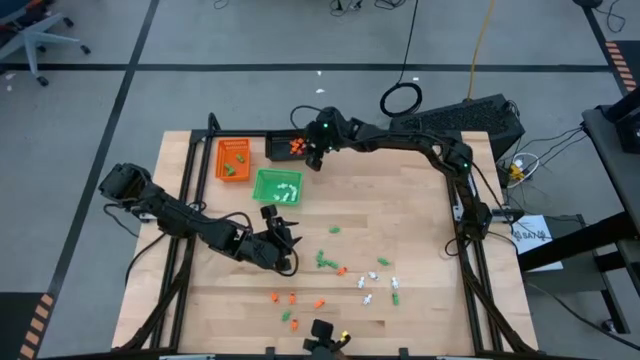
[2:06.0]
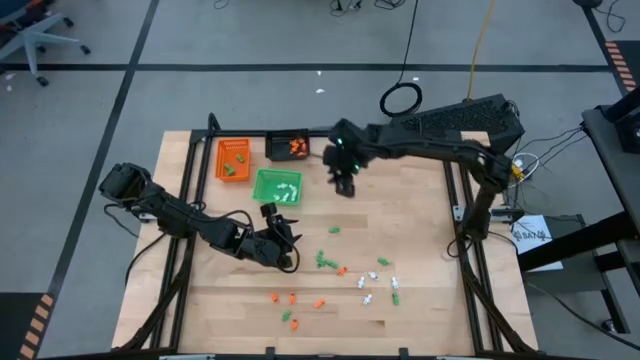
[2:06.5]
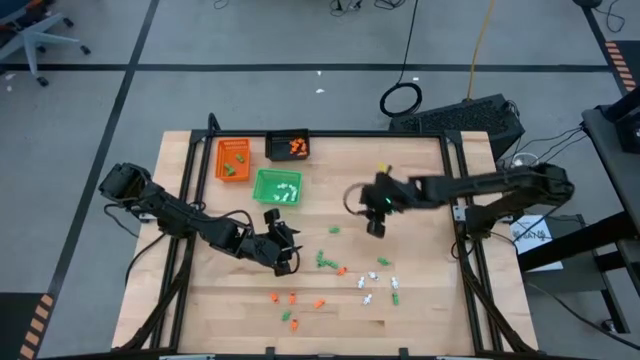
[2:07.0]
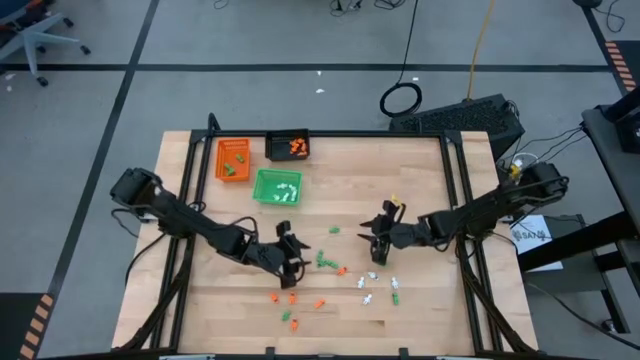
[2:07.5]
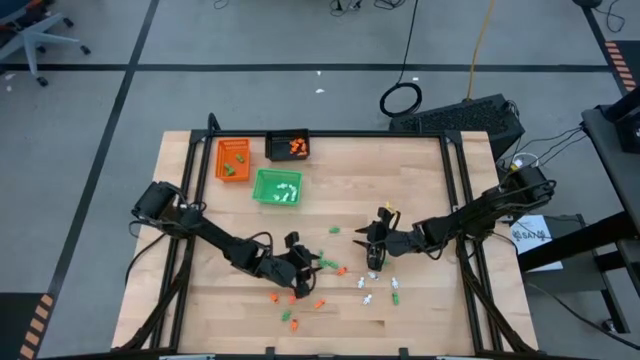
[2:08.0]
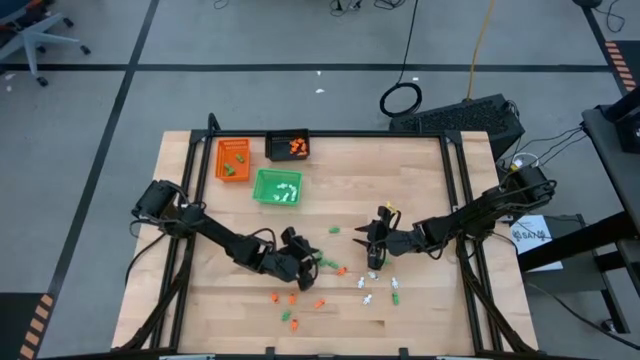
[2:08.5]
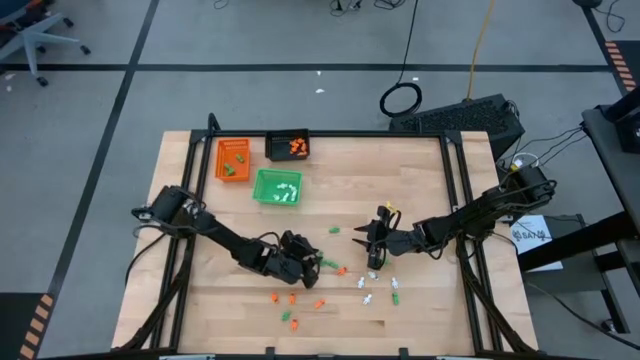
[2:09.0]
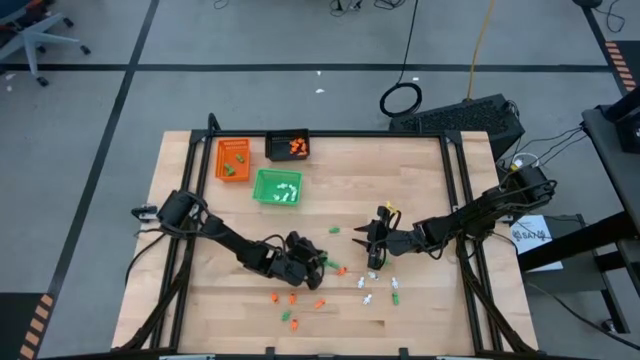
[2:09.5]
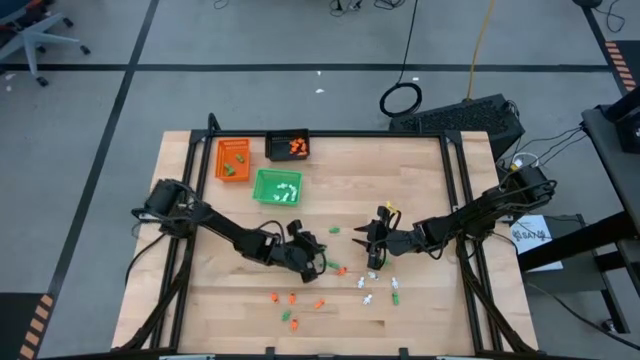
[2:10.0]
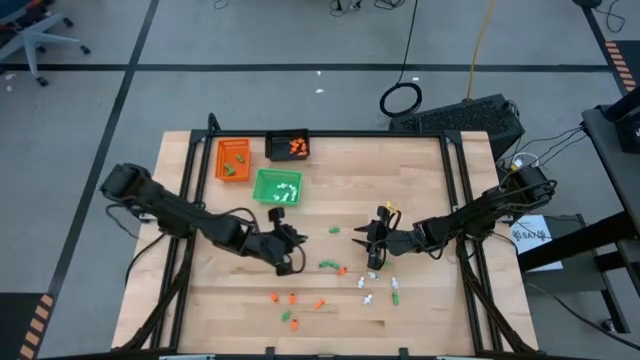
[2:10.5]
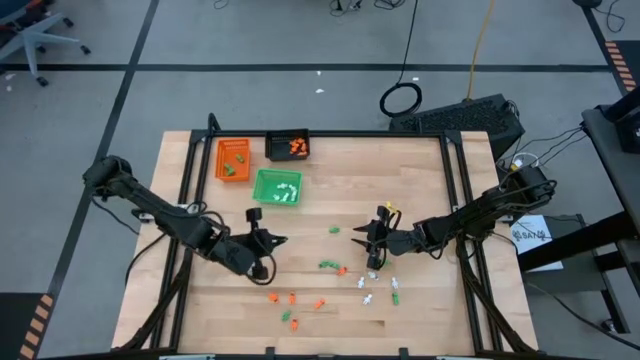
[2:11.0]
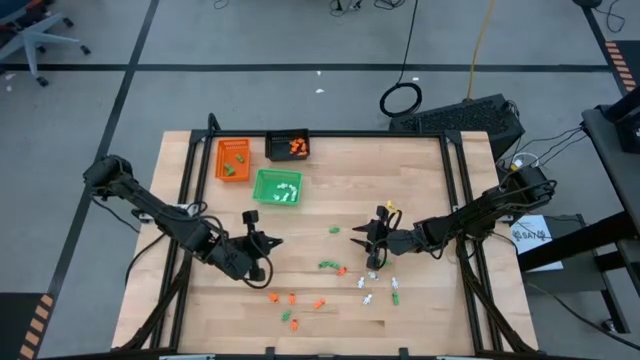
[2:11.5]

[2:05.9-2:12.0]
Task: Sort Halloween decoration
Put the green skeleton toy into the orange bin

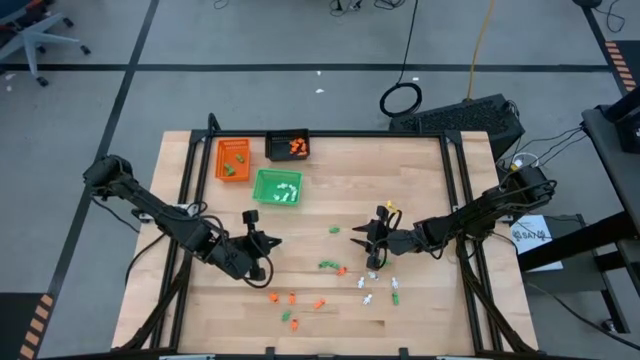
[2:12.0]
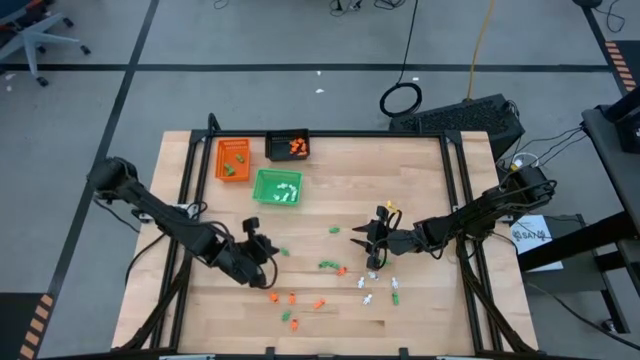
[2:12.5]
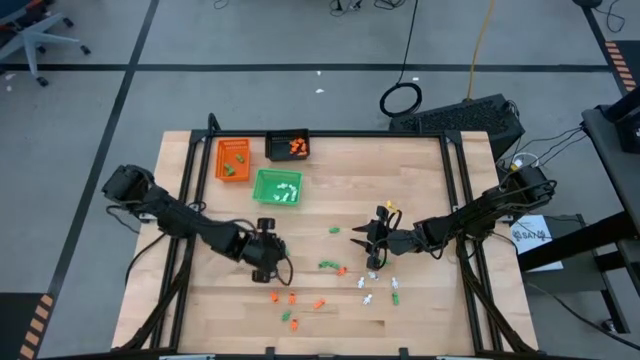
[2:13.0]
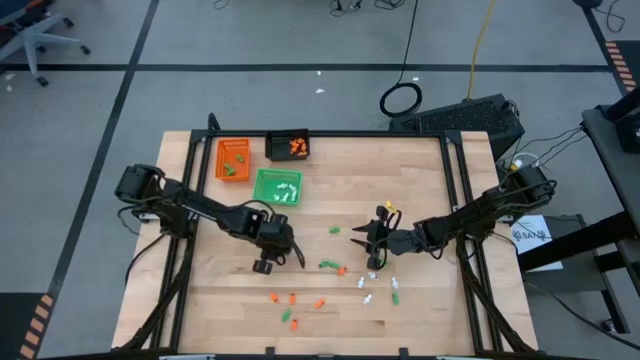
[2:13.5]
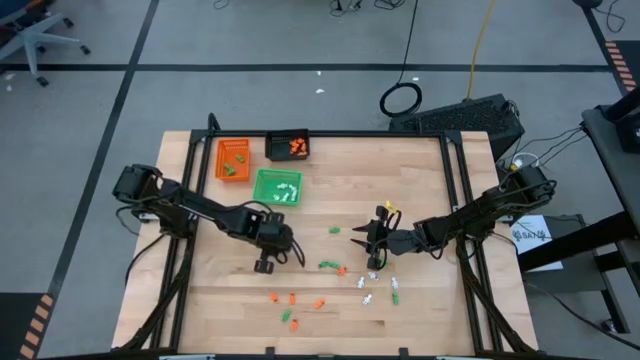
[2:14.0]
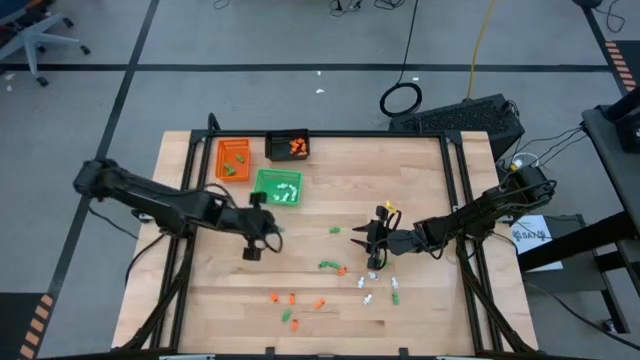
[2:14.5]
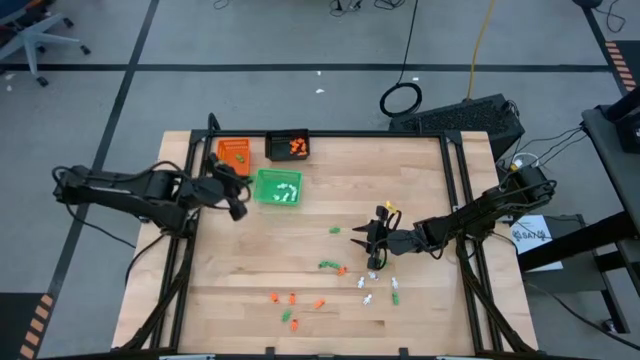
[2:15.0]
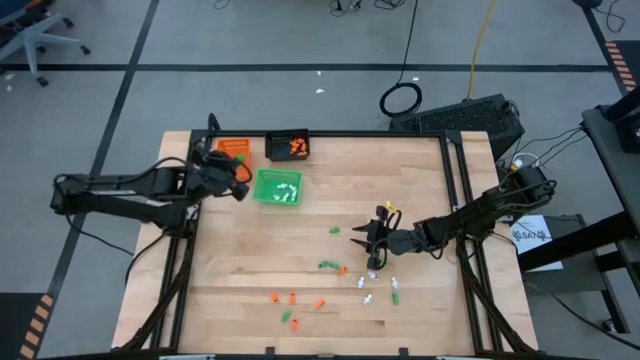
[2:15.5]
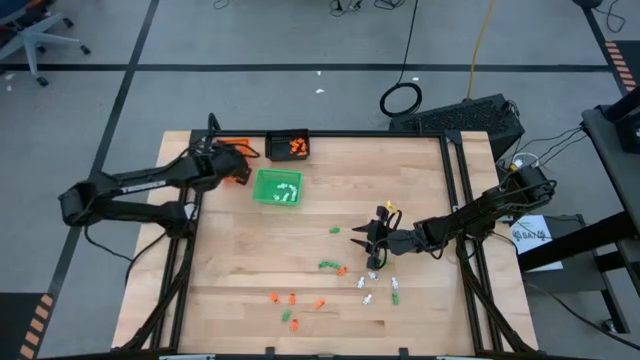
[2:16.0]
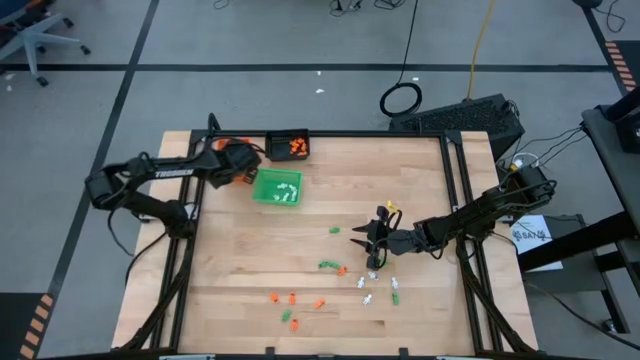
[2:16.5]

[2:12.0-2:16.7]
Put the green skeleton toy into the orange bin

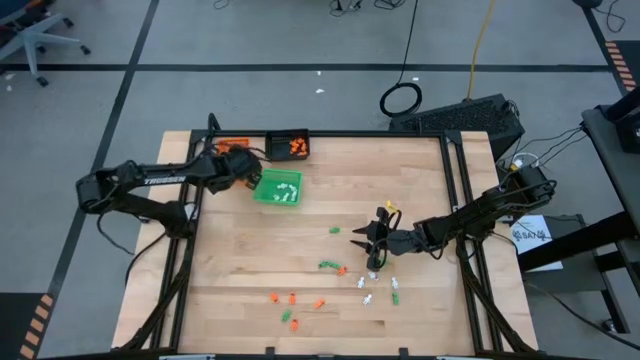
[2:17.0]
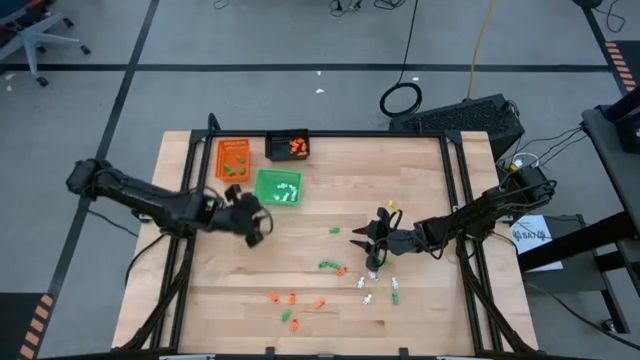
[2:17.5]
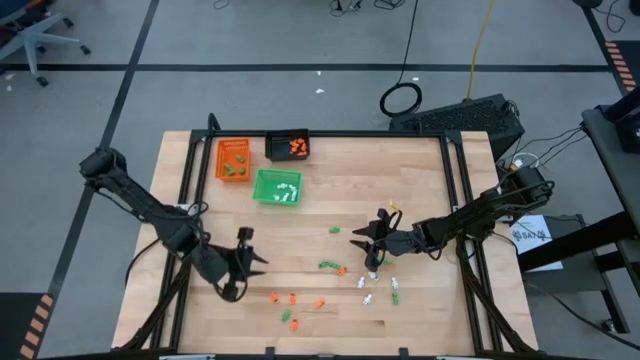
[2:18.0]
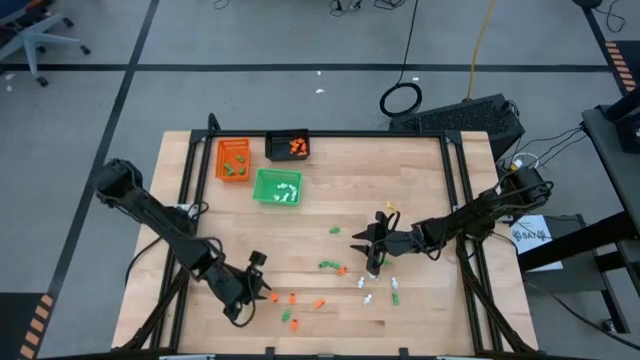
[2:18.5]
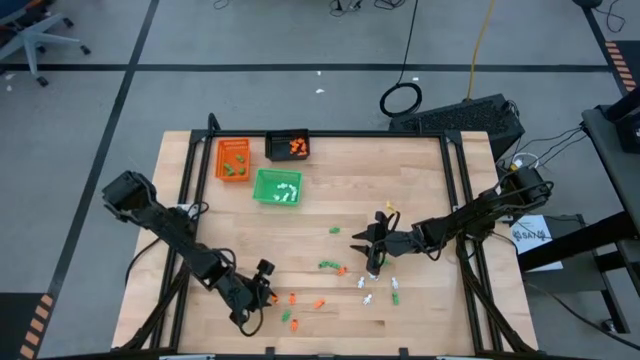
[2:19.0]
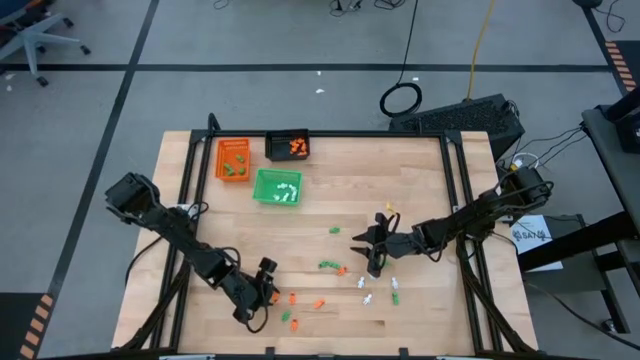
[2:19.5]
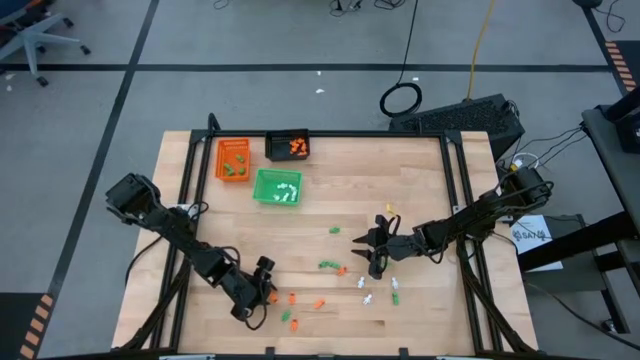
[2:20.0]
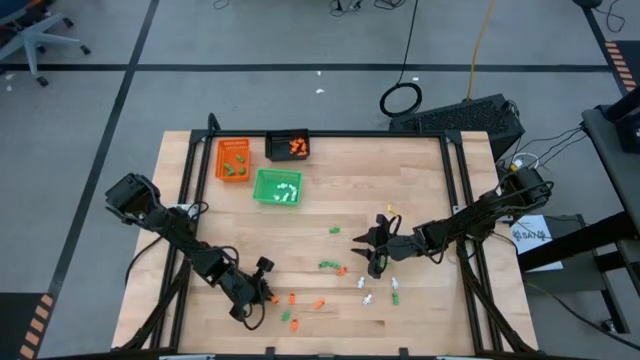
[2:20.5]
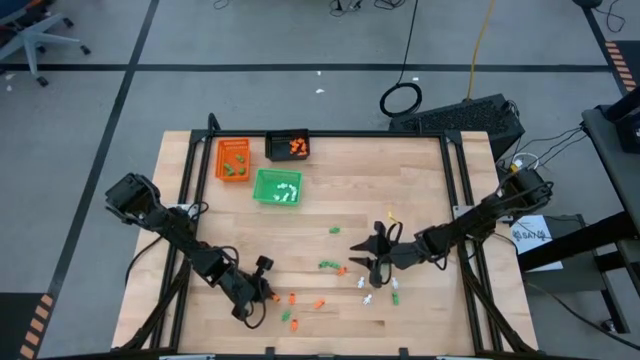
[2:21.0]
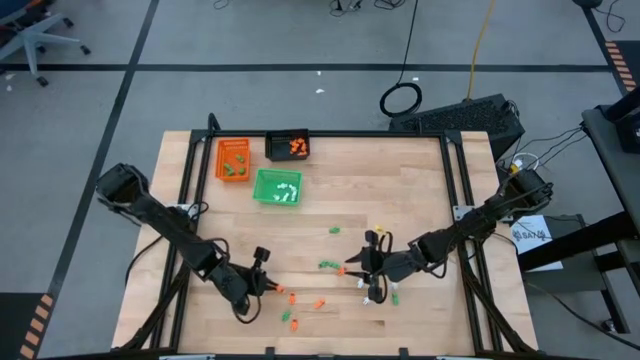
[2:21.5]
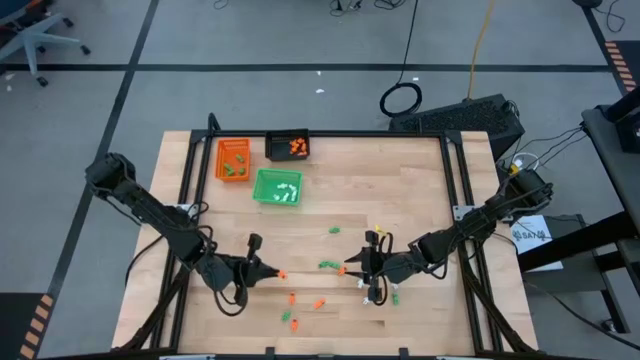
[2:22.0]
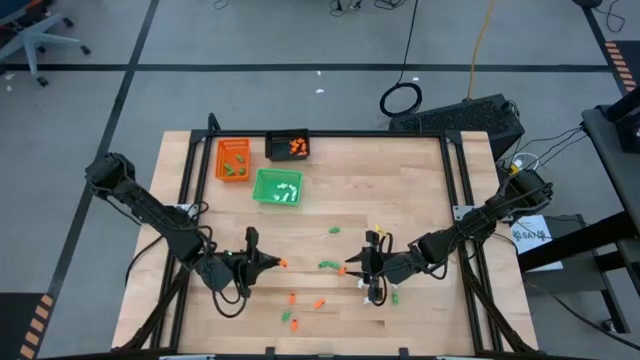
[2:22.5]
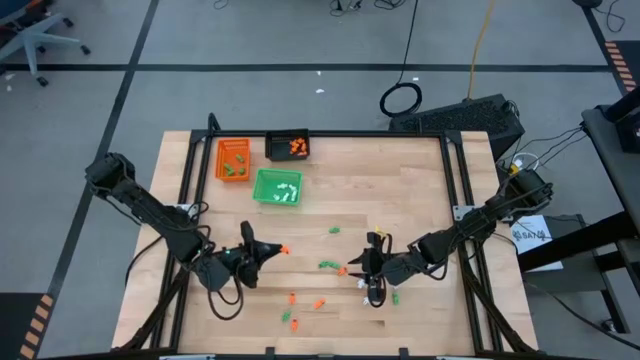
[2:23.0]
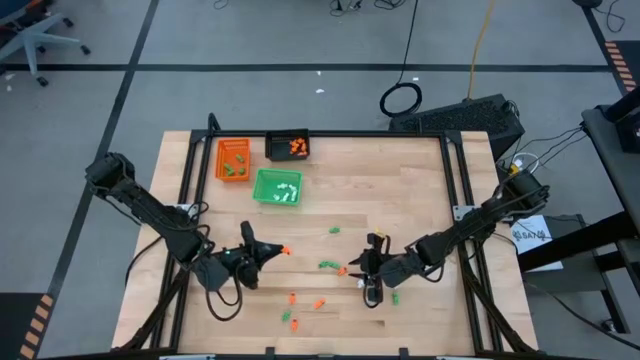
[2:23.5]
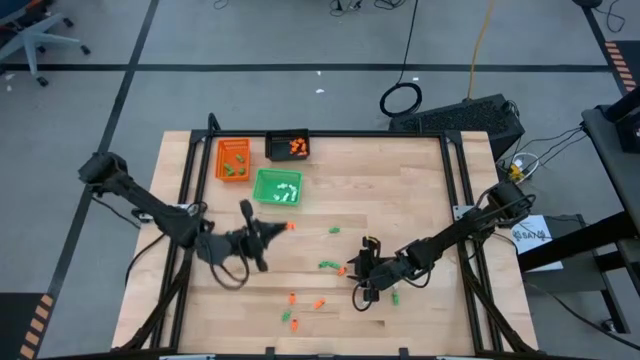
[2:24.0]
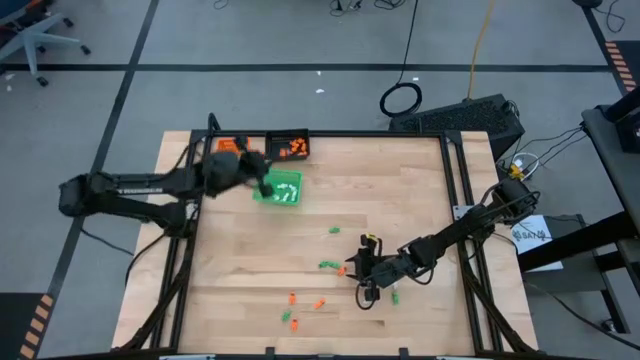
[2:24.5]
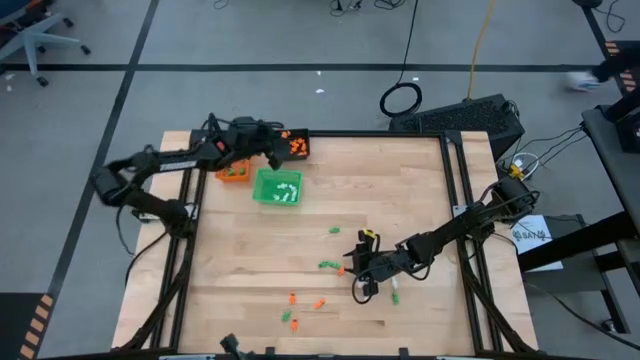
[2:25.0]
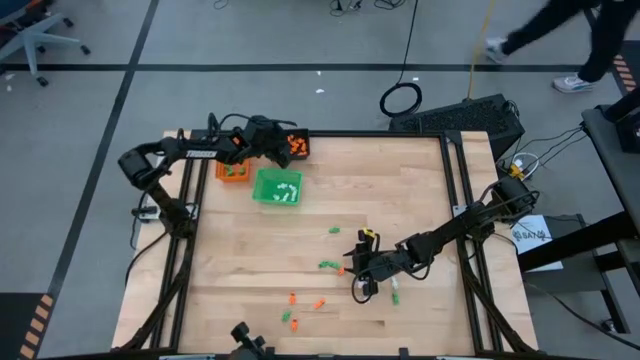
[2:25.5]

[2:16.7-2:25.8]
Put the orange skeleton toy into the black bin

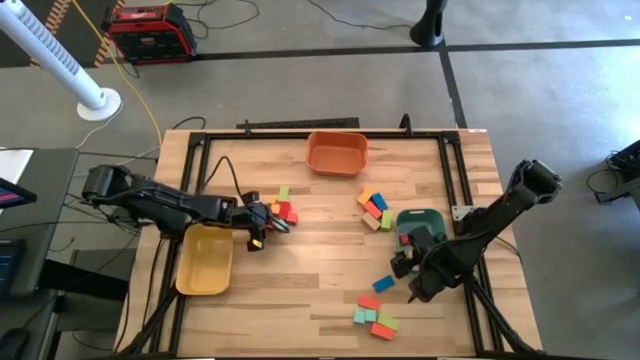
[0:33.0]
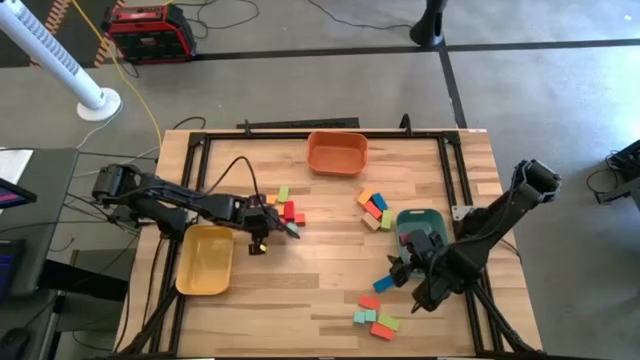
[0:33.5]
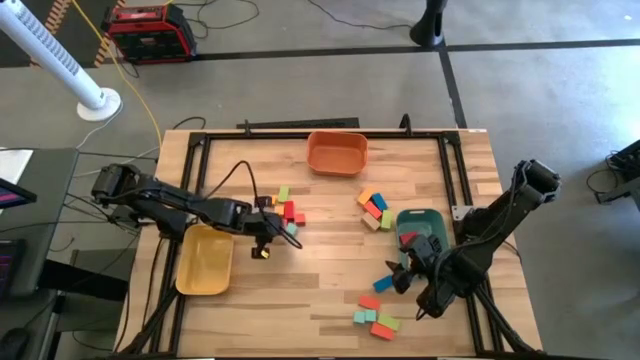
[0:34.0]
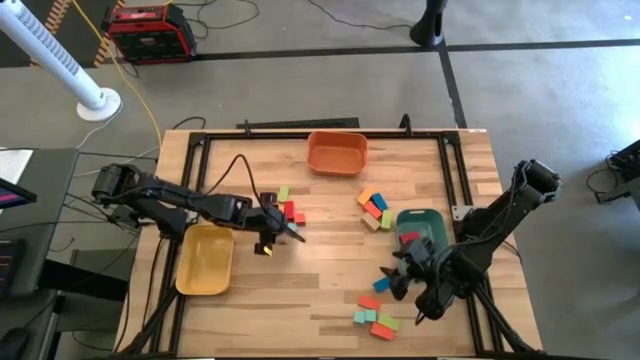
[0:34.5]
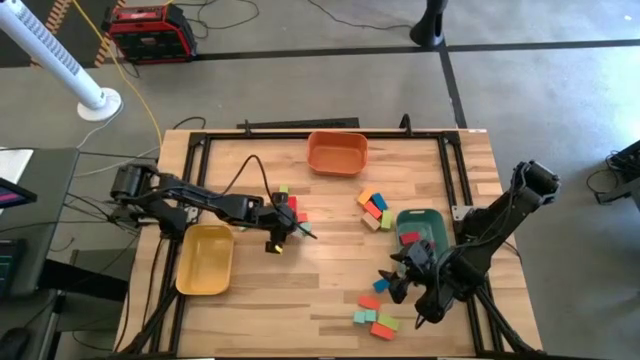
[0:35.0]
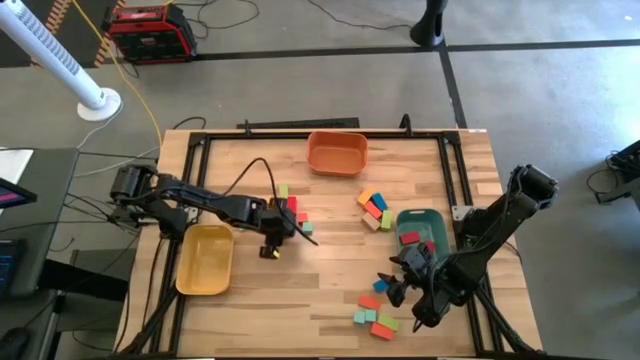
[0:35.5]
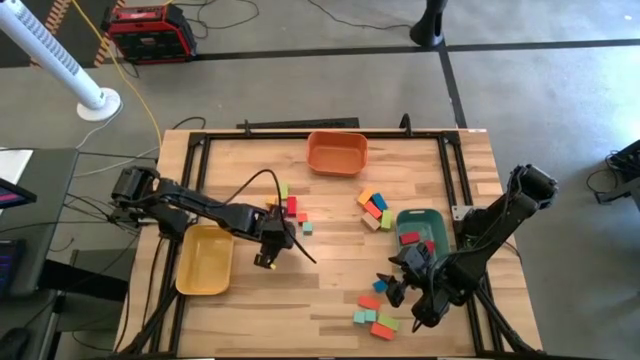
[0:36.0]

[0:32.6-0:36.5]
Task: Sort blocks by size
Put the small orange block into the yellow bin
